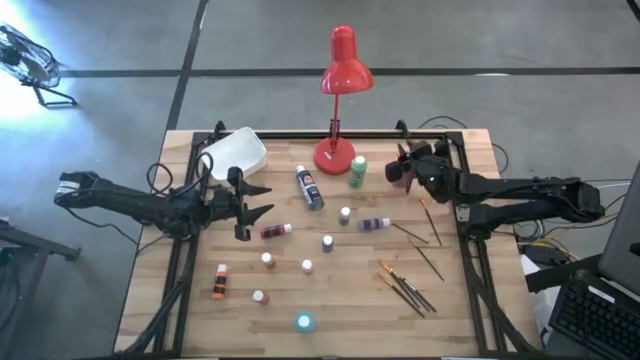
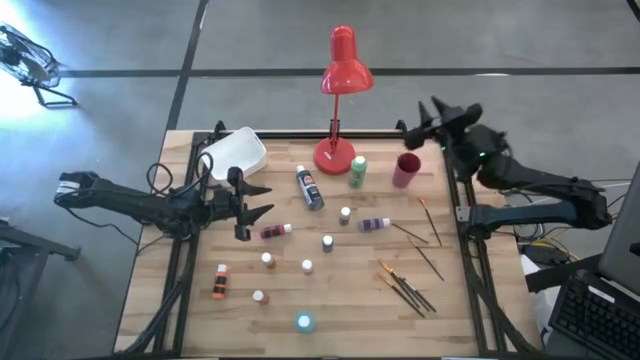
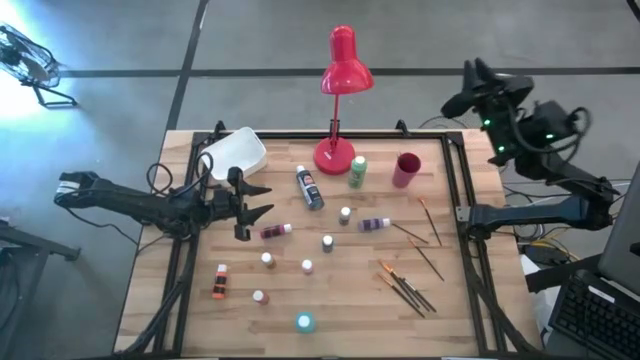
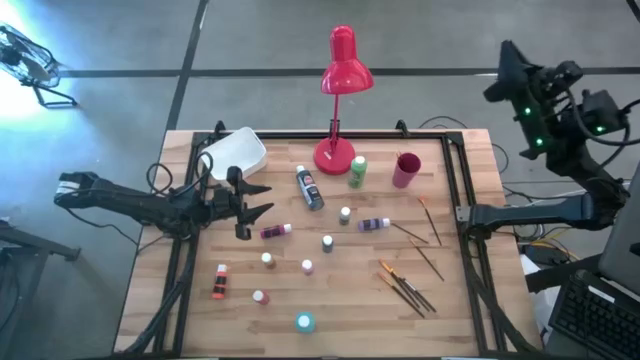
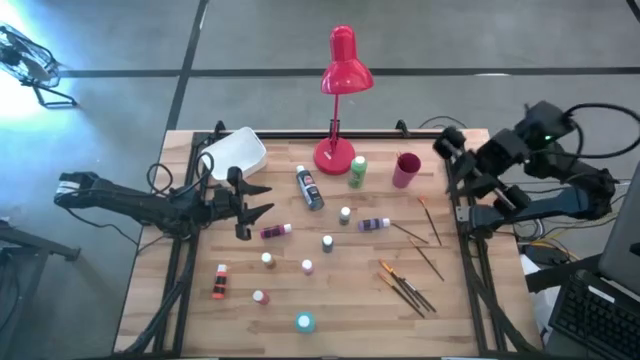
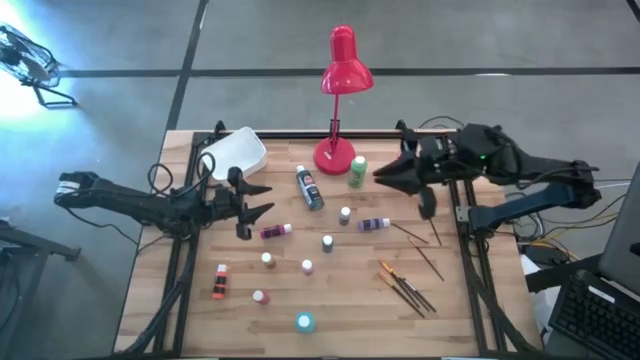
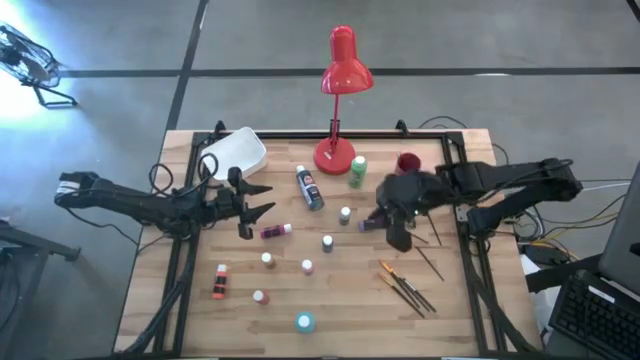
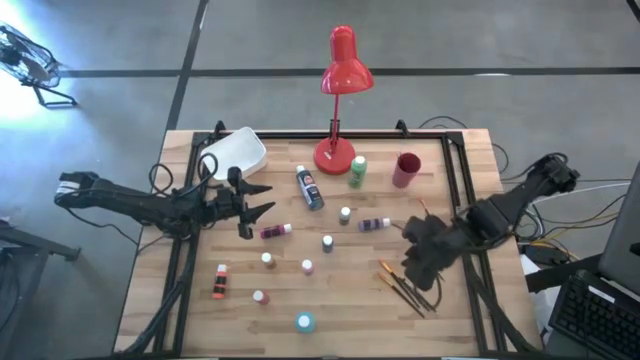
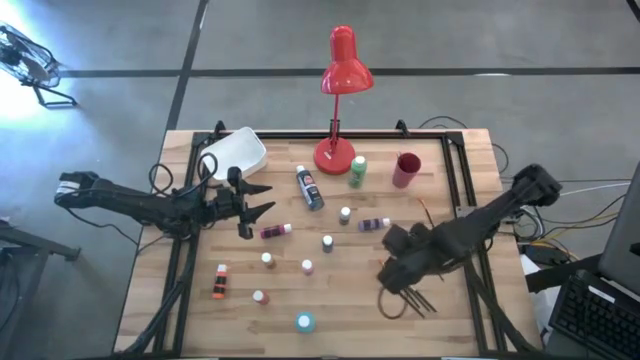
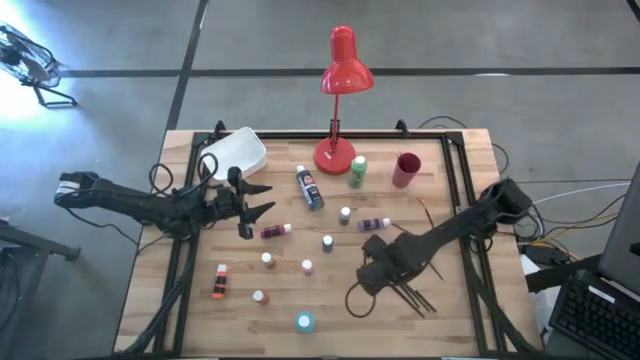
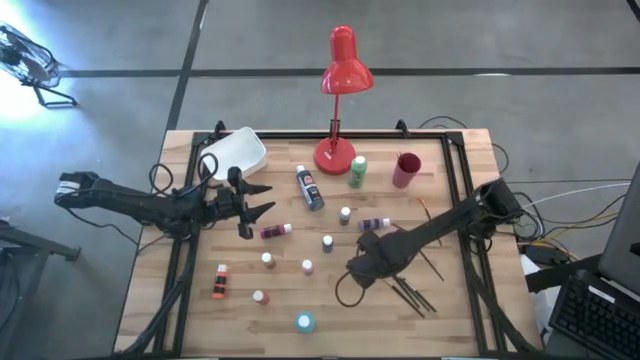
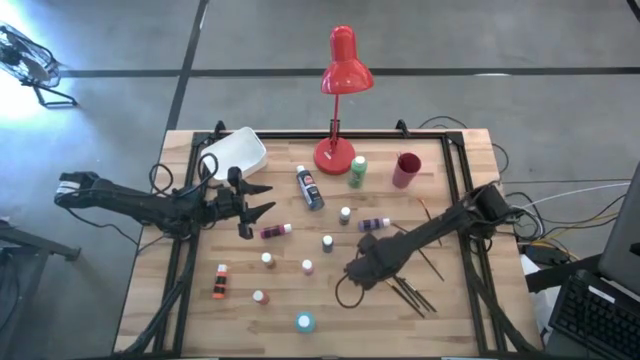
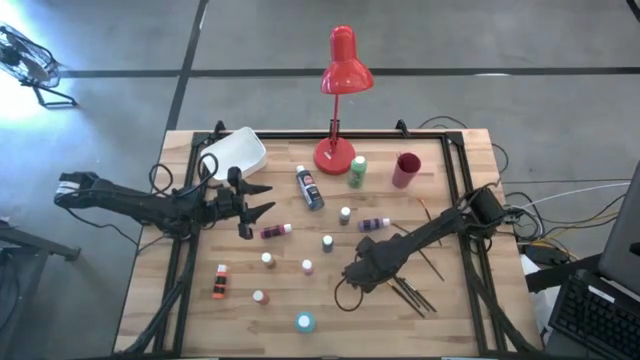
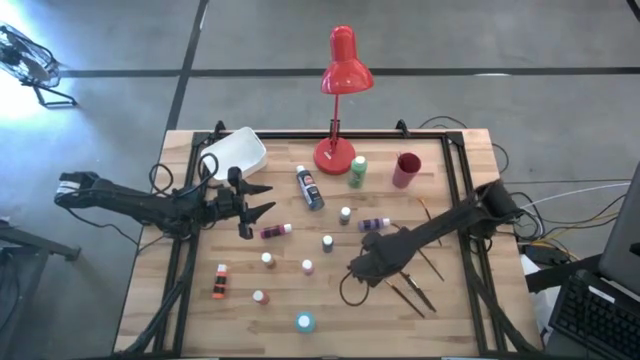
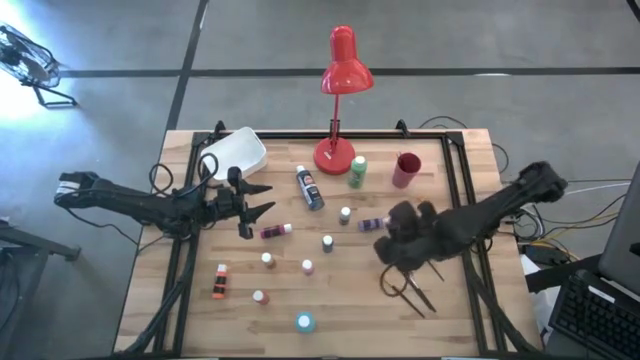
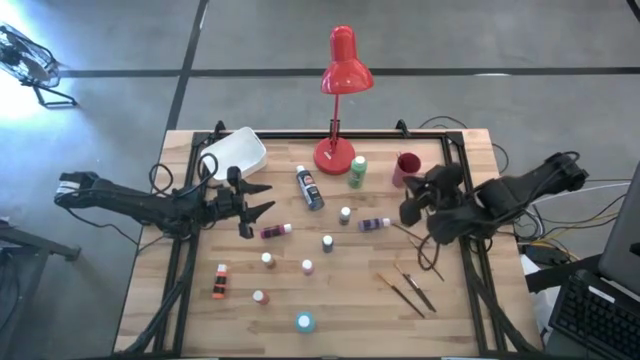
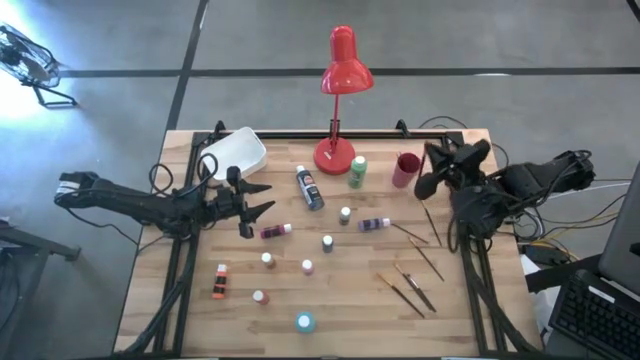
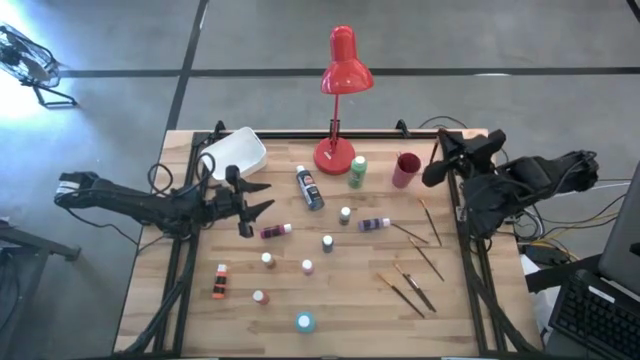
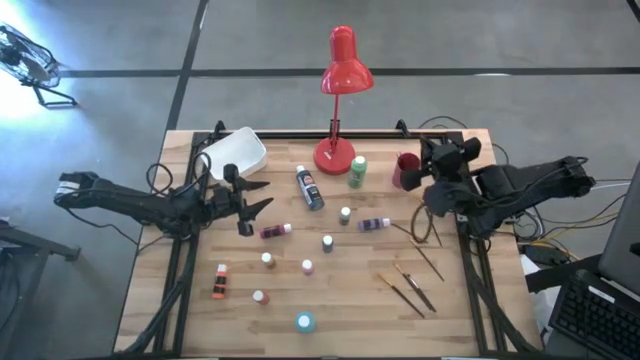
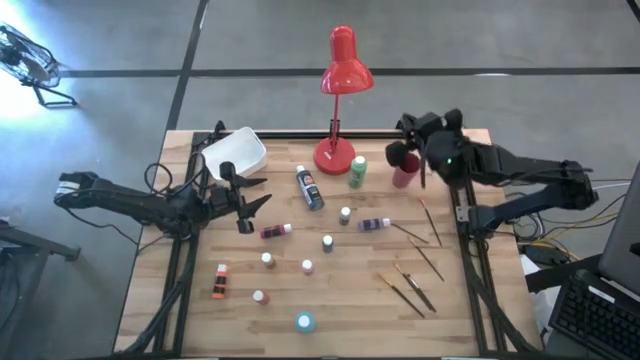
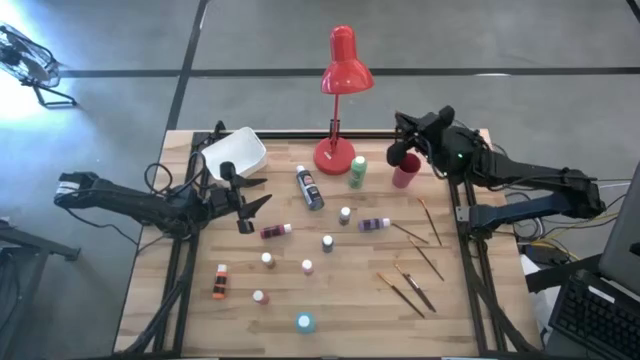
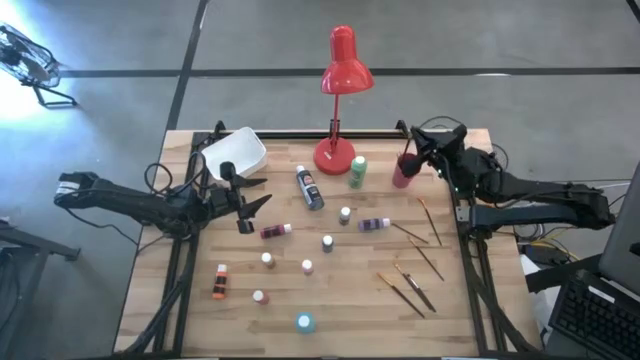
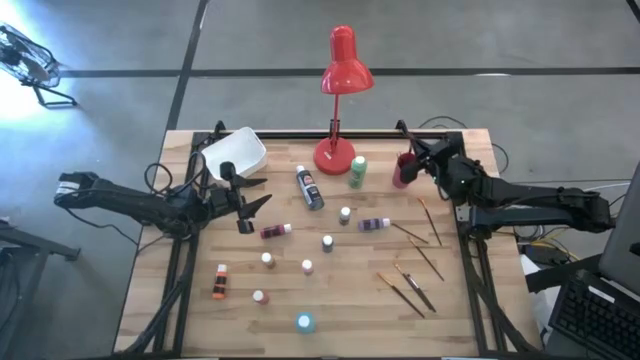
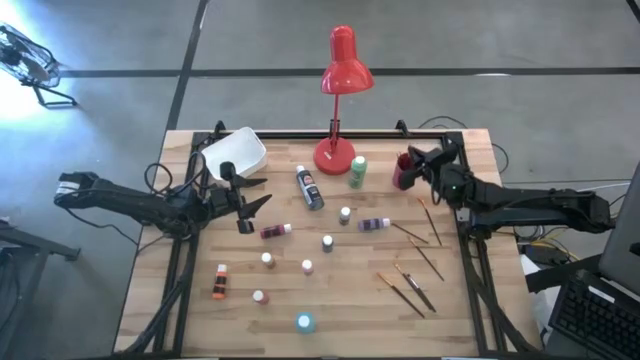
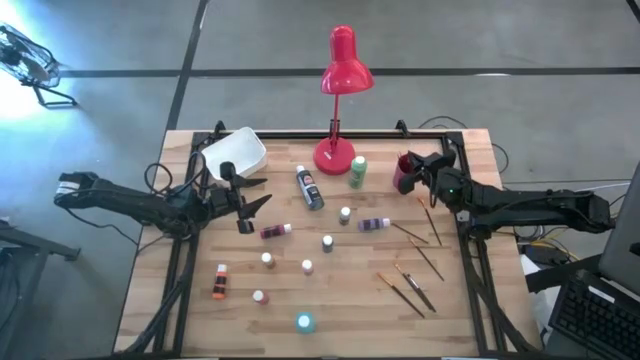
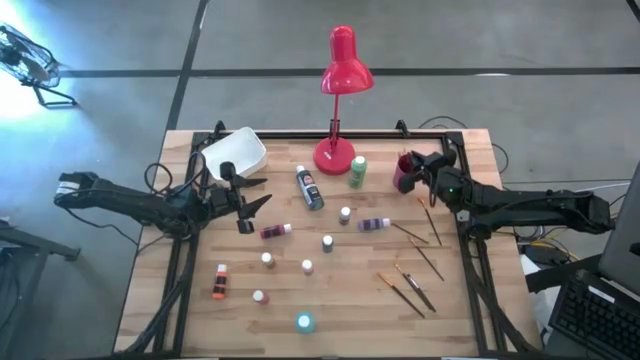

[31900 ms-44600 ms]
Task: Pick & Place Paint Supplies
Put the gold paintbrush into the pink cup
